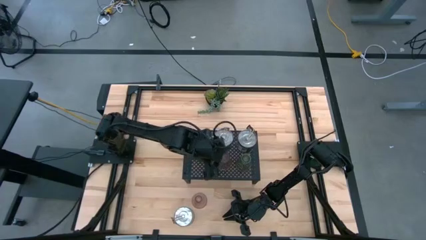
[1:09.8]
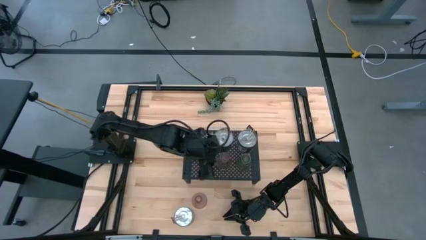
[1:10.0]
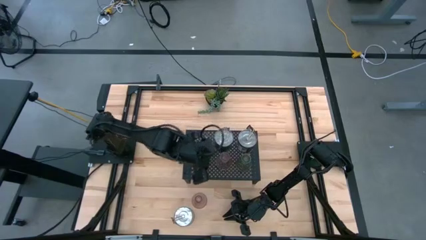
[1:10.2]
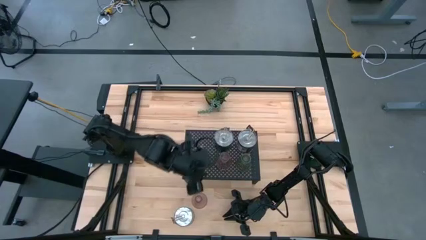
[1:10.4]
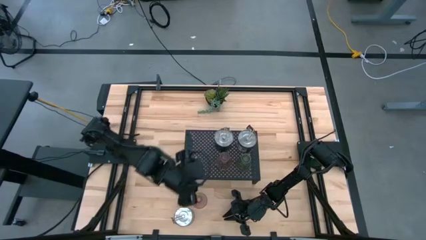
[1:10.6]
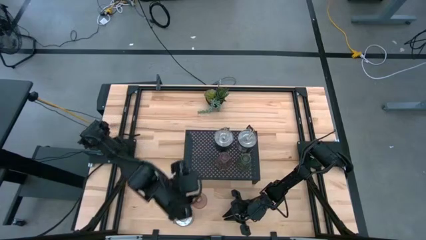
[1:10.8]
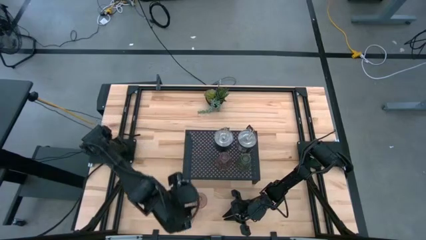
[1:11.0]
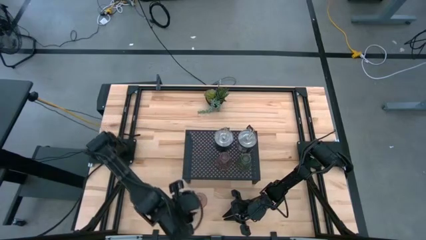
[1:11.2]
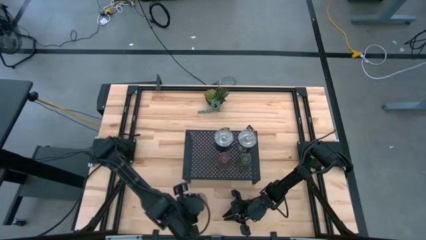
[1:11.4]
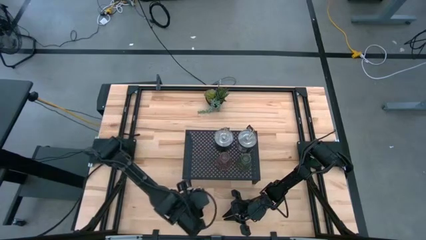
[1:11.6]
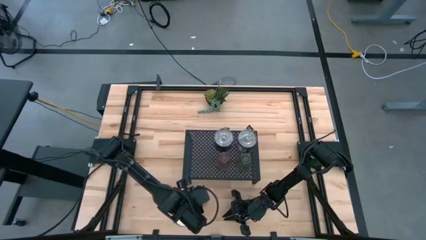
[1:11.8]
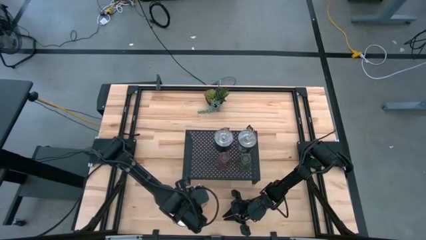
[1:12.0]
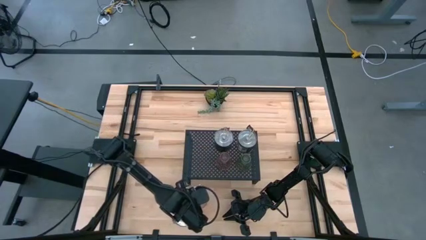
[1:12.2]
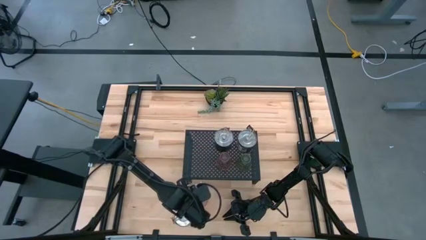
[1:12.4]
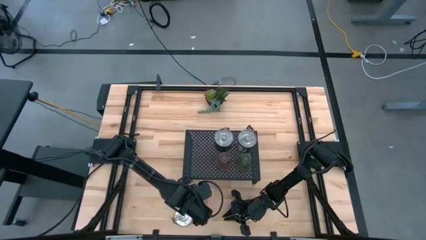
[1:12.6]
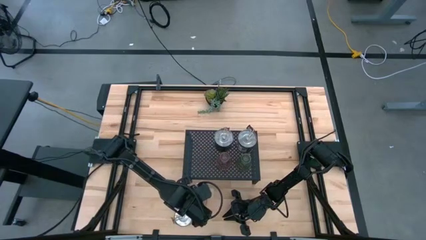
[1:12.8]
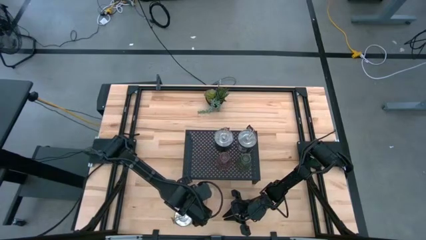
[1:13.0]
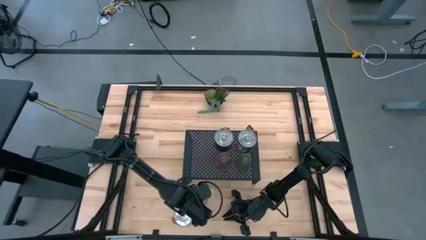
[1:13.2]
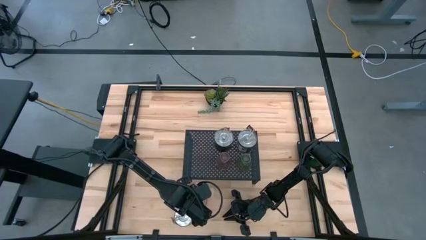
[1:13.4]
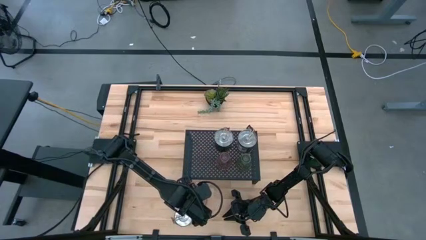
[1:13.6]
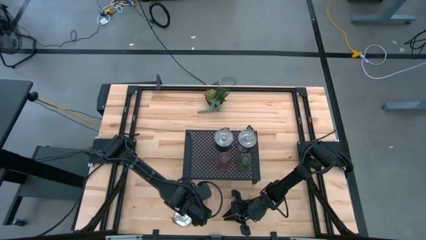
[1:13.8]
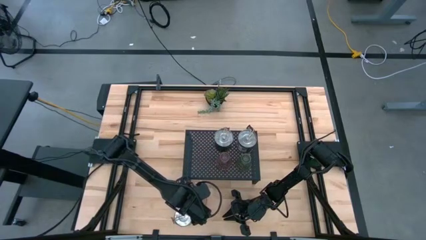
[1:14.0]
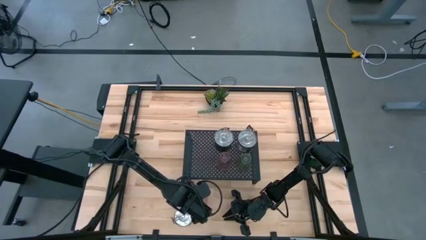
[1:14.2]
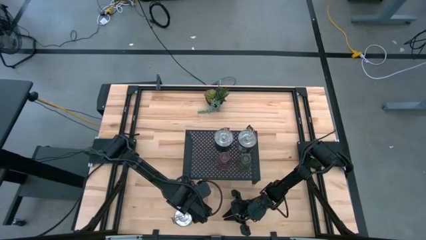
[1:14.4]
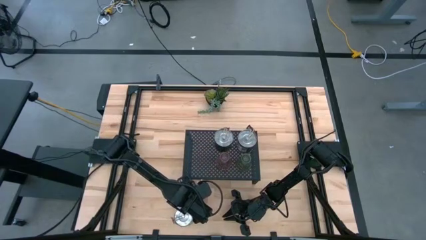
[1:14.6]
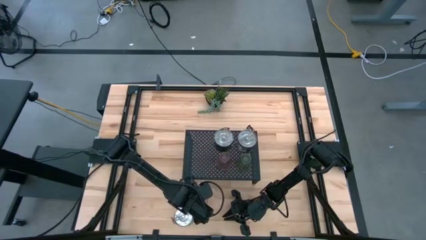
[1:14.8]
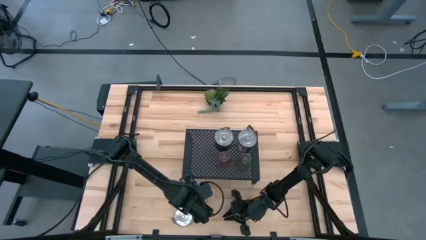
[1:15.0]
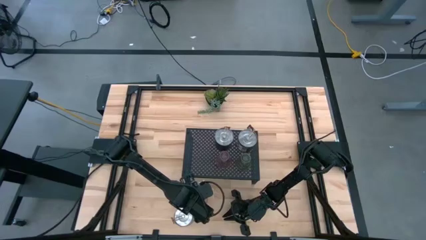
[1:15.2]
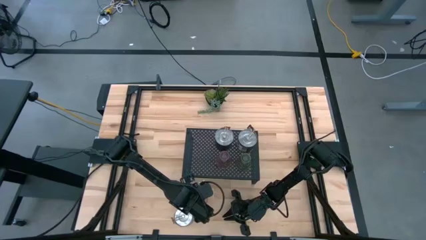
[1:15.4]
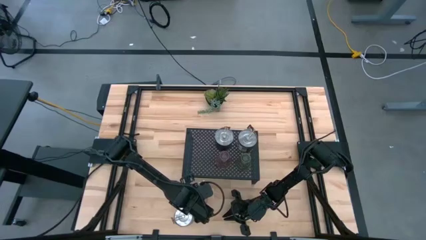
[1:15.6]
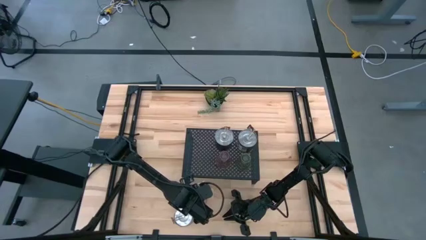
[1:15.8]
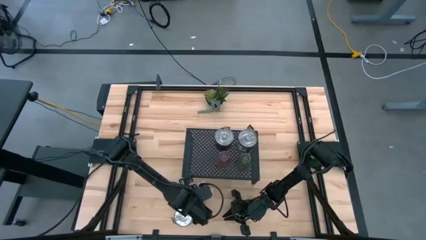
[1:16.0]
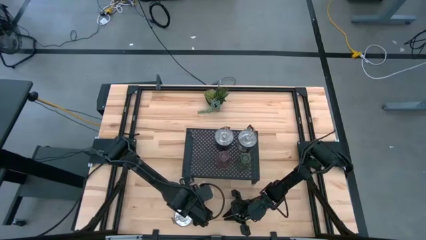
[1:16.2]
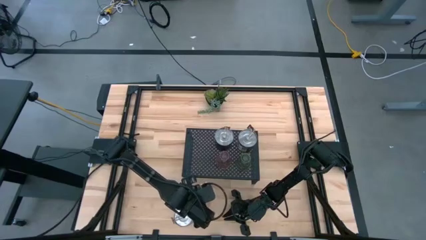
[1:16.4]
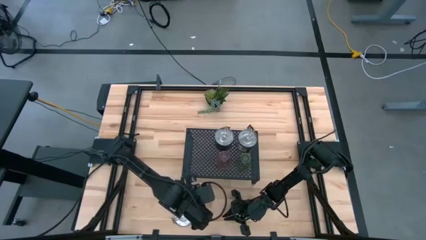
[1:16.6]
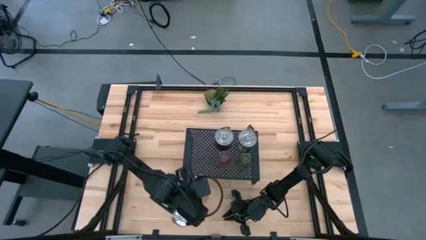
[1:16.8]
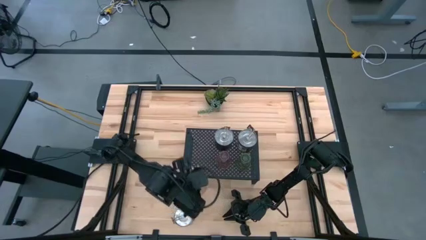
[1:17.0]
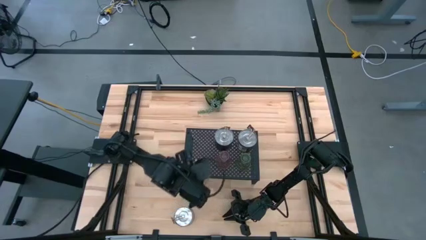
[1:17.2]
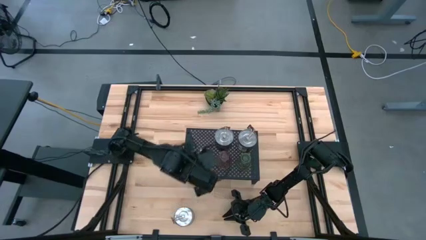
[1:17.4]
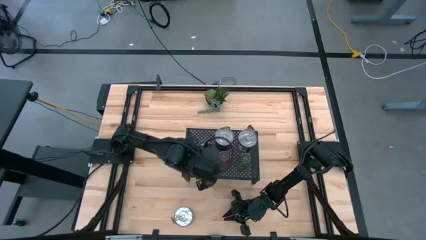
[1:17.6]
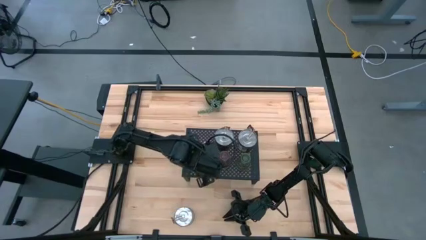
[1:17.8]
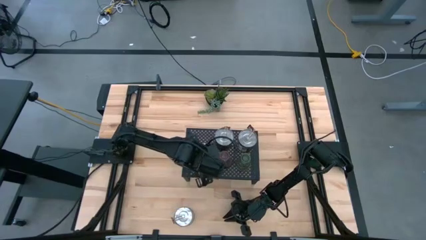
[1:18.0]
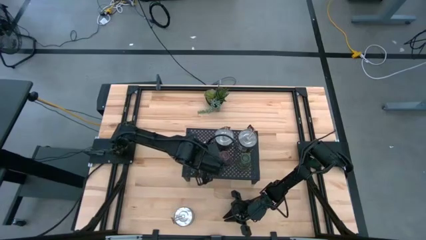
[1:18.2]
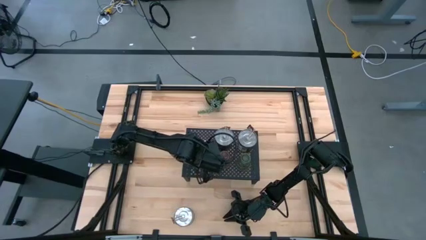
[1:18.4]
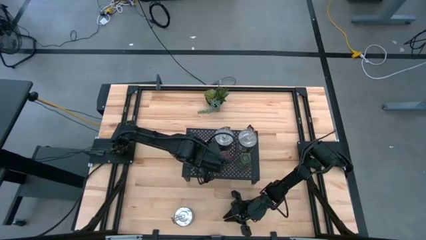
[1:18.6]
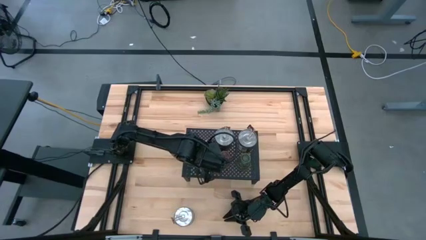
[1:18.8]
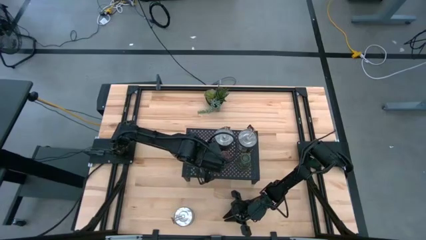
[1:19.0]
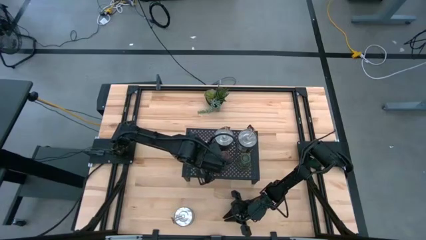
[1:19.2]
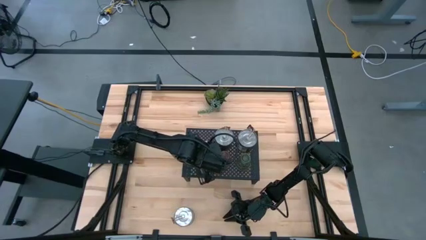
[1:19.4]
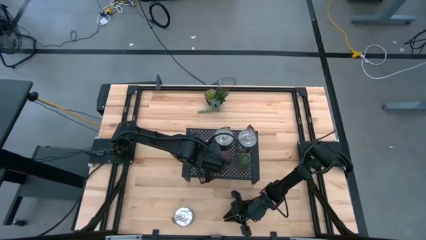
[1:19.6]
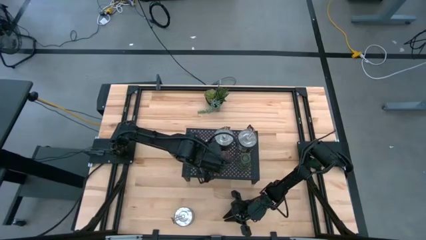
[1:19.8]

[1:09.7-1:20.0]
Task: Pick & Place candle stick holders
Put the pink glass candle holder on the shelf aligned with the other glass candle holders

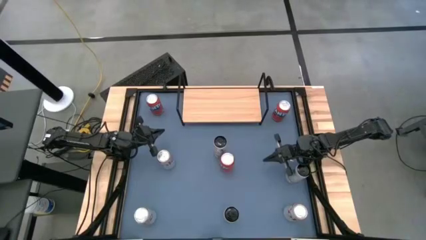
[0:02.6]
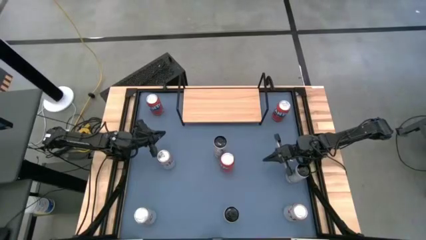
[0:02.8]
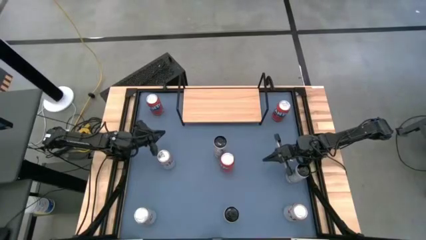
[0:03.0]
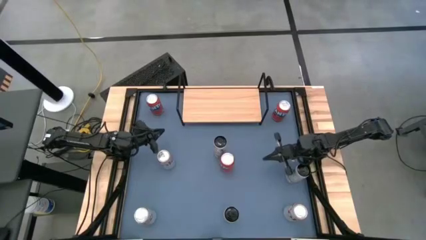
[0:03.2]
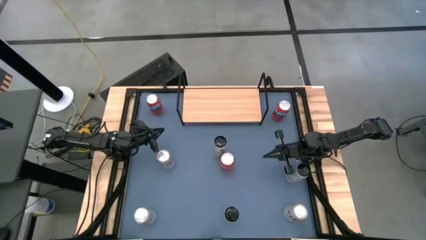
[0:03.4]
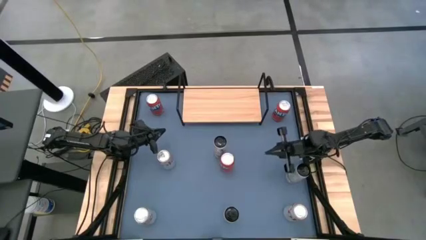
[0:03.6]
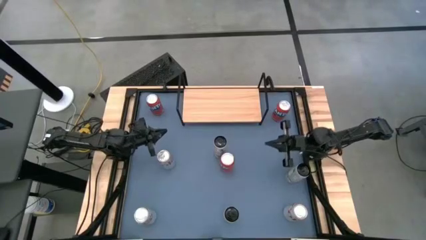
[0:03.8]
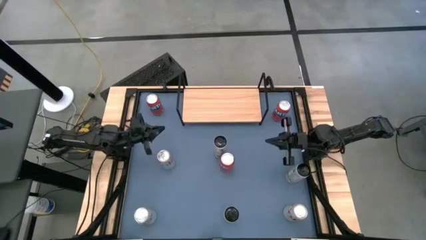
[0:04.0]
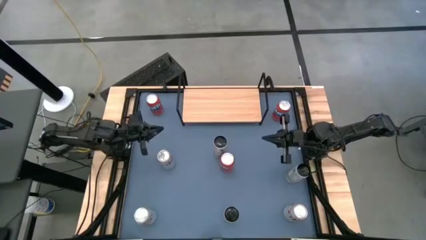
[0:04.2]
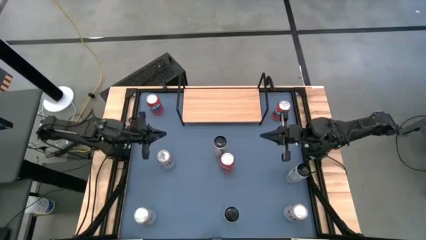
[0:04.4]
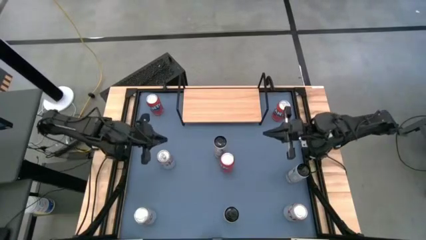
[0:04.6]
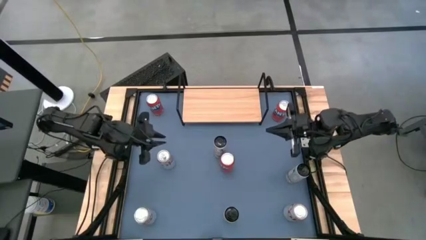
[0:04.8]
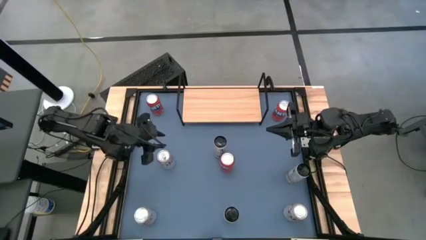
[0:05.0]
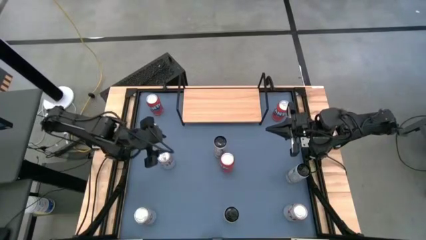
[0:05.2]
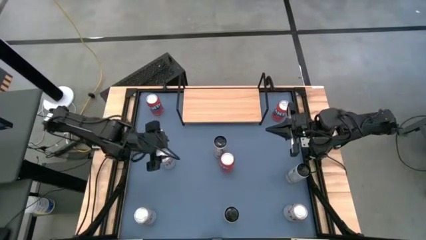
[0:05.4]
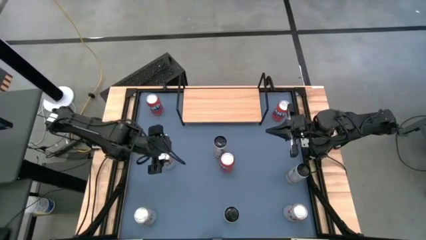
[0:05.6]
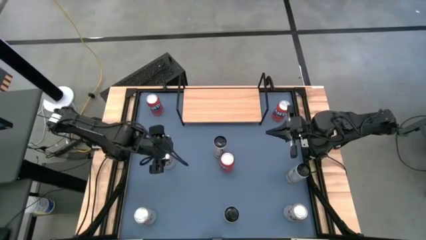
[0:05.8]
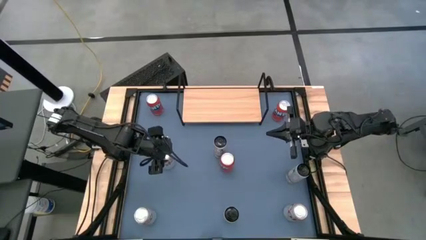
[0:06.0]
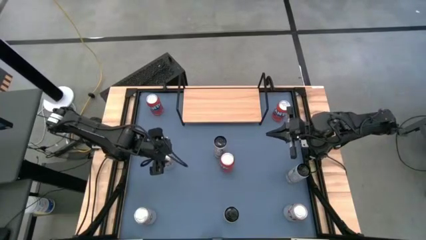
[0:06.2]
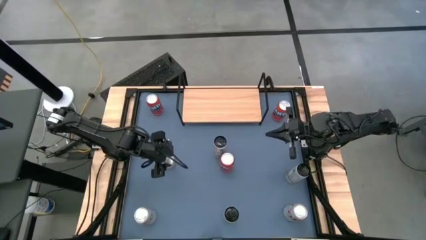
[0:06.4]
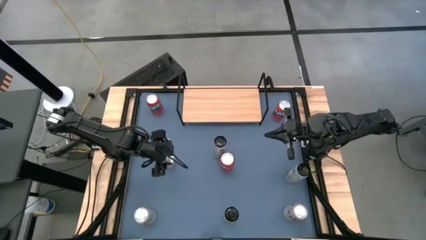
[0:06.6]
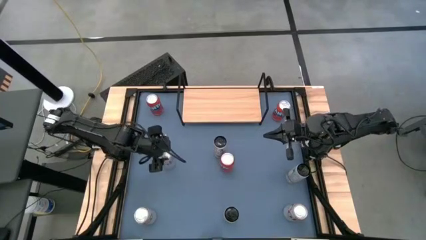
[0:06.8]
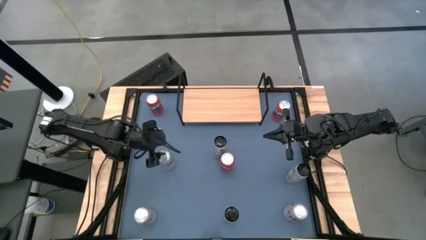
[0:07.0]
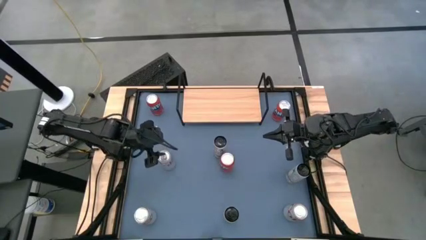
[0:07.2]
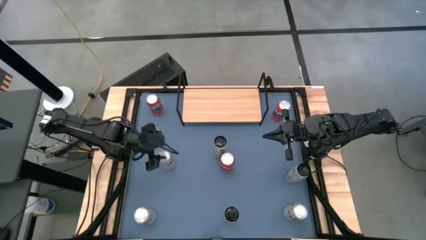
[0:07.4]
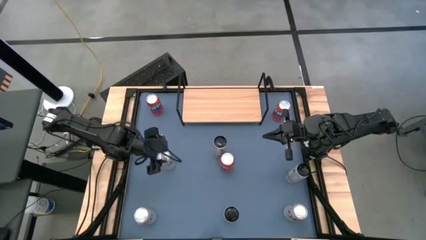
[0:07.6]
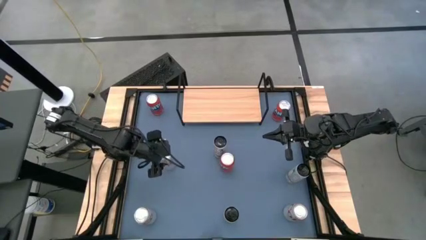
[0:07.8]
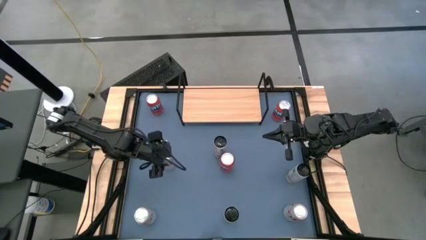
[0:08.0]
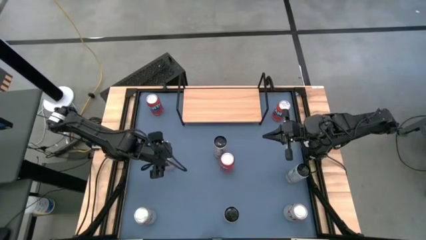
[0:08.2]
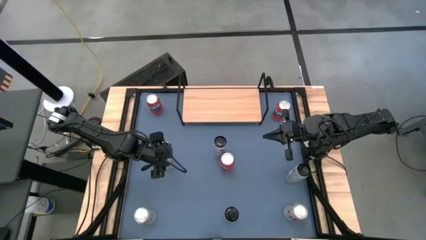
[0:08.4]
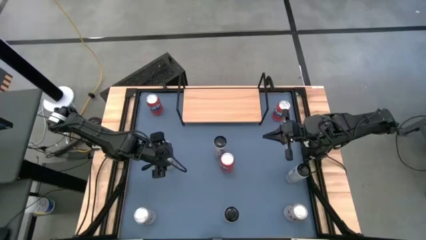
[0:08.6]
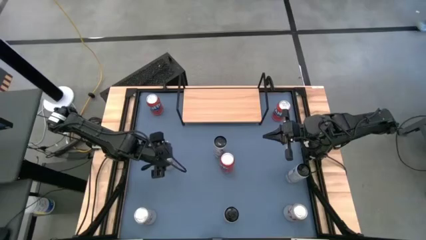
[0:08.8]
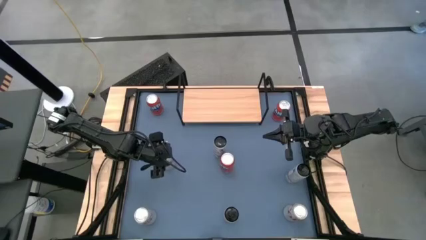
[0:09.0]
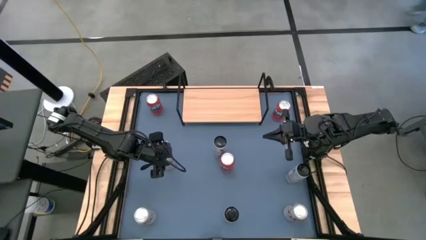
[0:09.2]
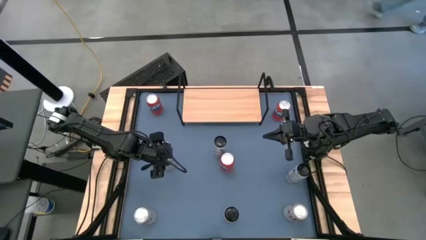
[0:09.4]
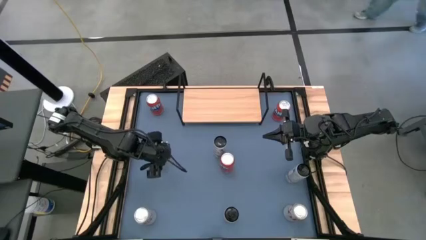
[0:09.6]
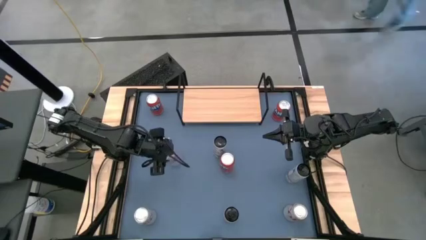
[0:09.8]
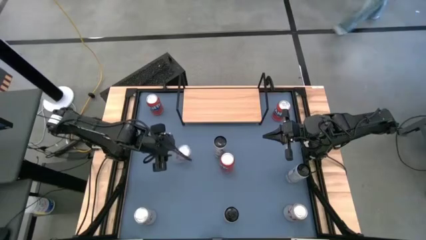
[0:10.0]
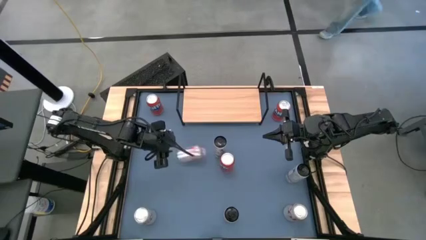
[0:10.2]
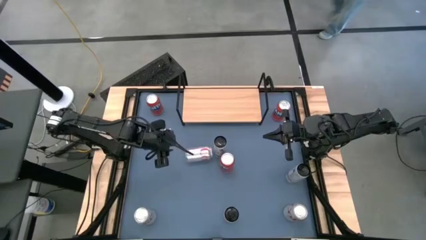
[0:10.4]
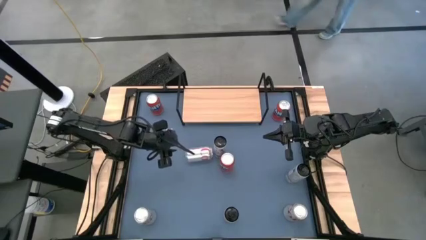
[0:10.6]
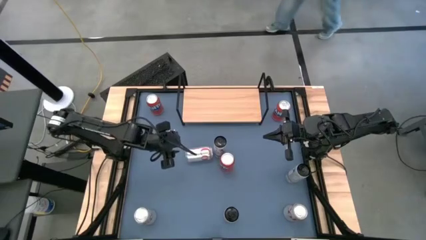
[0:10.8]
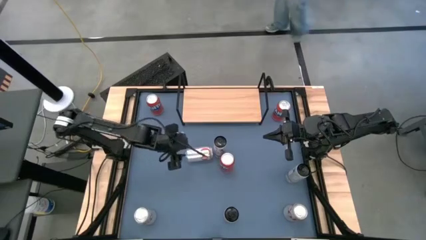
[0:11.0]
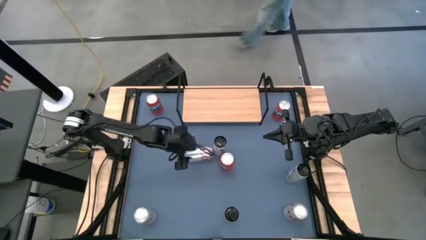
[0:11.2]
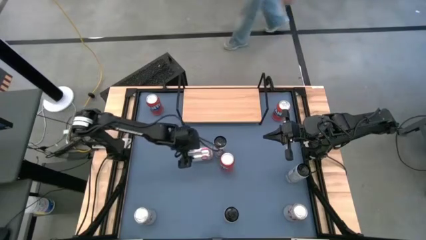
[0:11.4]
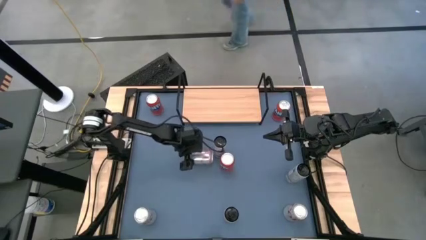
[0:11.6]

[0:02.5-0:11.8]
Task: Place canned beverage on shelf
Put the top left silver soda can on the shelf
